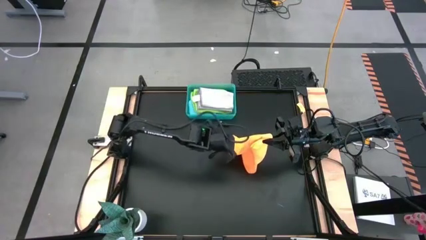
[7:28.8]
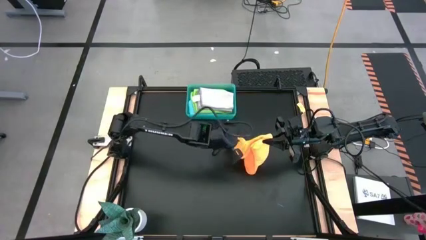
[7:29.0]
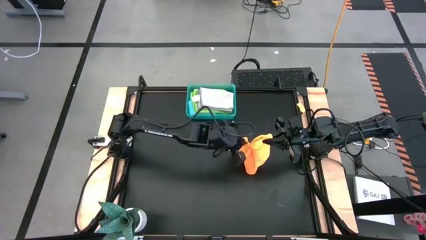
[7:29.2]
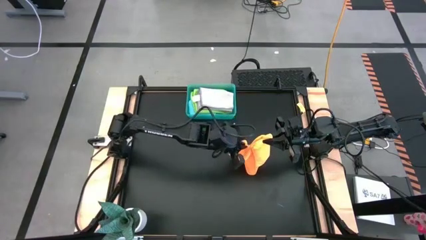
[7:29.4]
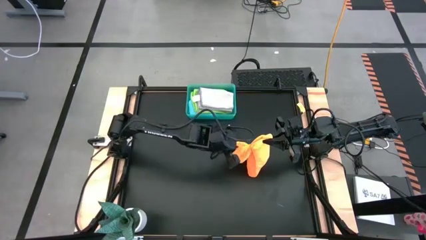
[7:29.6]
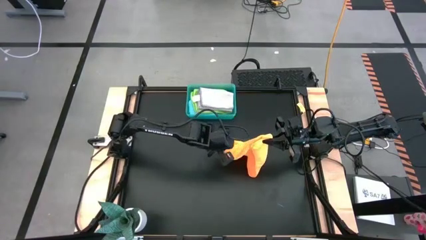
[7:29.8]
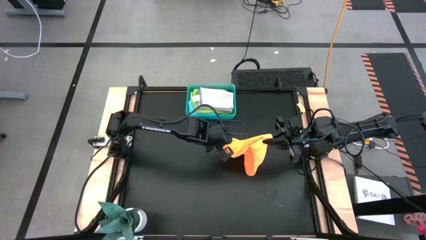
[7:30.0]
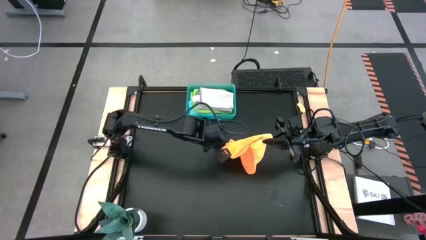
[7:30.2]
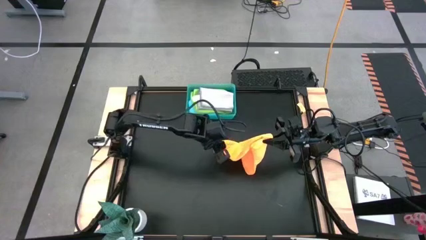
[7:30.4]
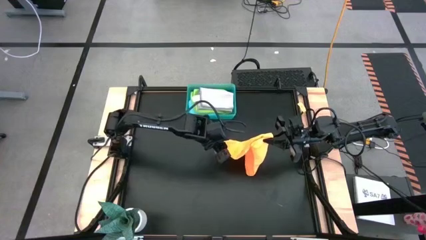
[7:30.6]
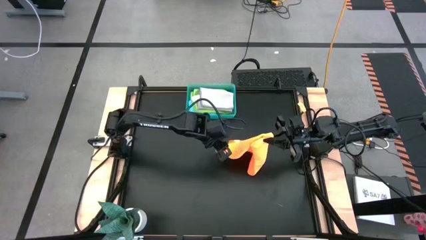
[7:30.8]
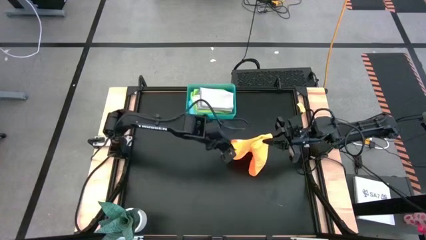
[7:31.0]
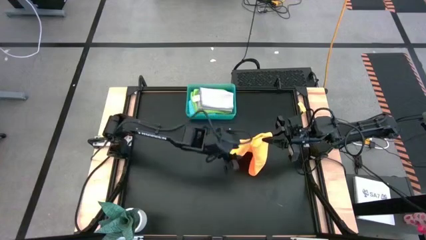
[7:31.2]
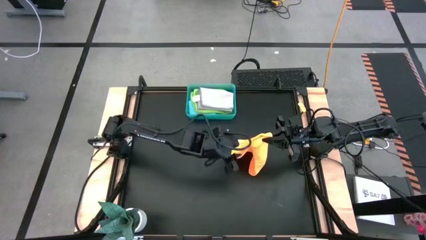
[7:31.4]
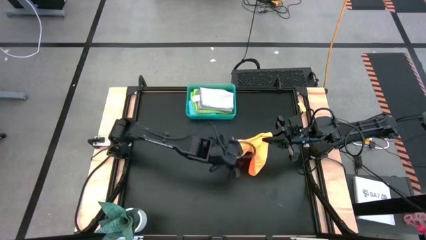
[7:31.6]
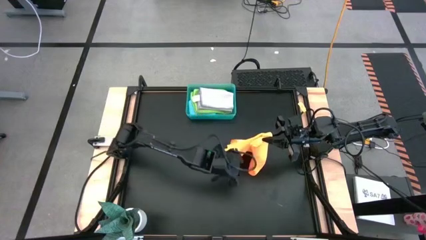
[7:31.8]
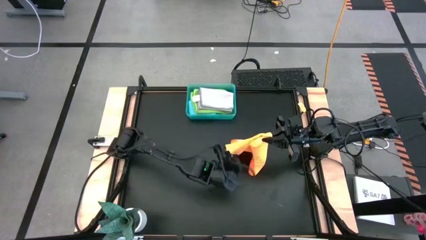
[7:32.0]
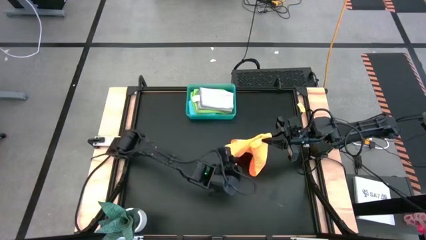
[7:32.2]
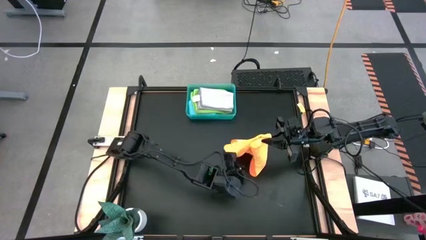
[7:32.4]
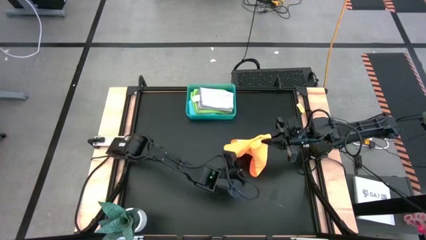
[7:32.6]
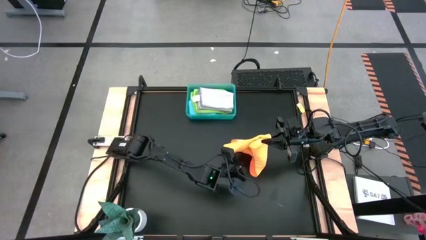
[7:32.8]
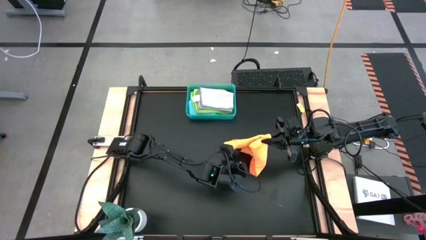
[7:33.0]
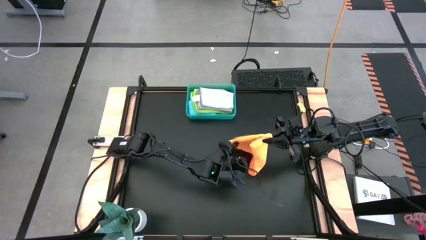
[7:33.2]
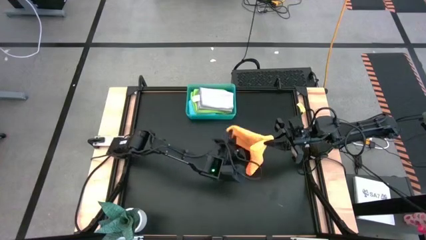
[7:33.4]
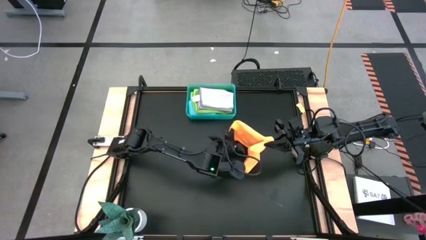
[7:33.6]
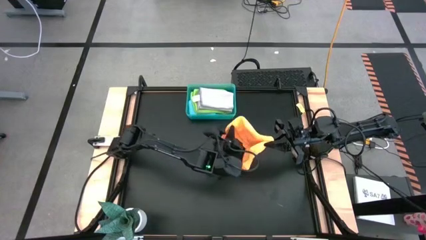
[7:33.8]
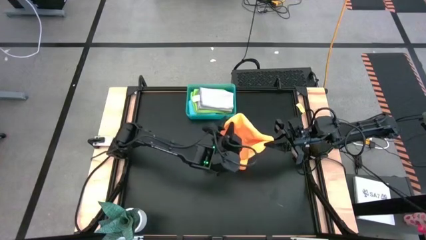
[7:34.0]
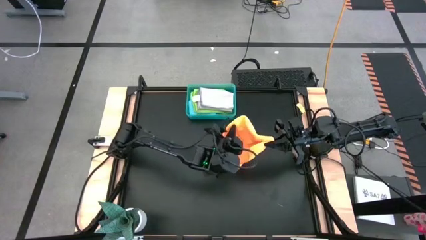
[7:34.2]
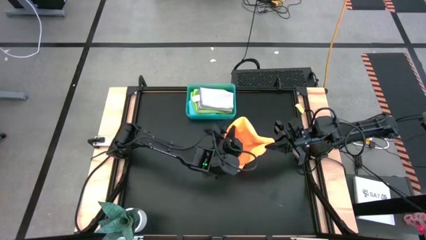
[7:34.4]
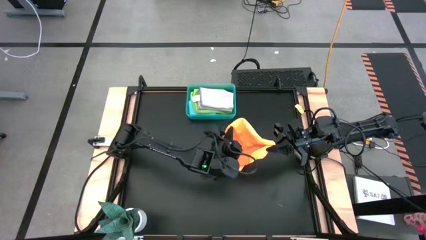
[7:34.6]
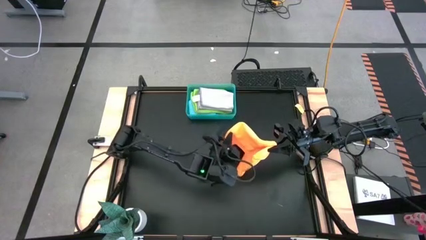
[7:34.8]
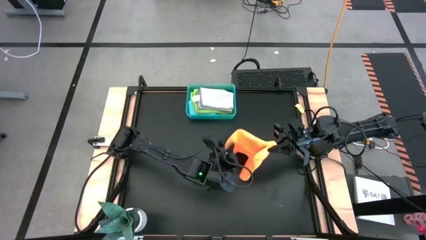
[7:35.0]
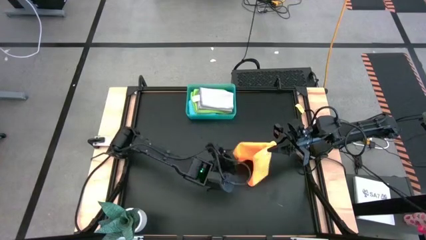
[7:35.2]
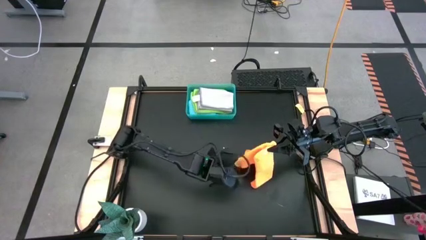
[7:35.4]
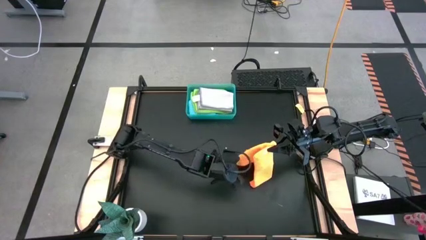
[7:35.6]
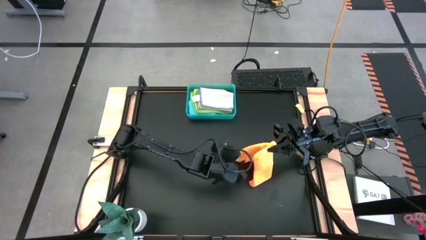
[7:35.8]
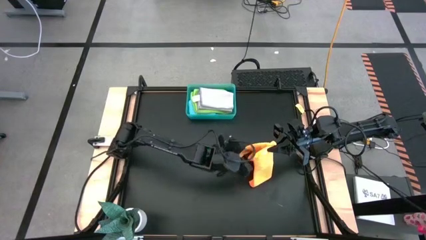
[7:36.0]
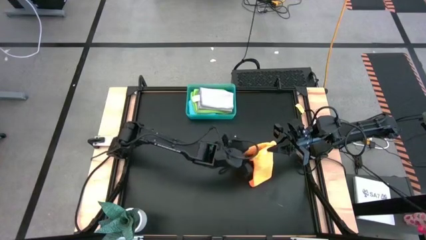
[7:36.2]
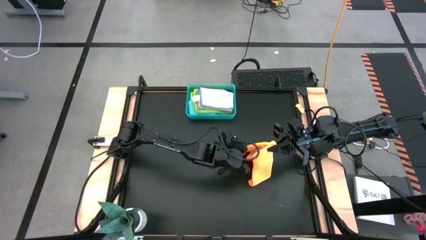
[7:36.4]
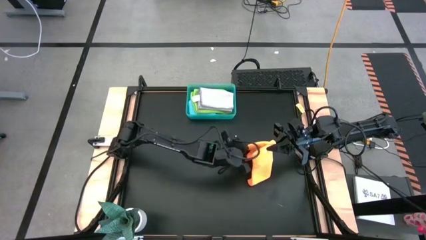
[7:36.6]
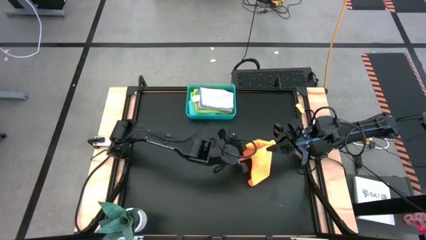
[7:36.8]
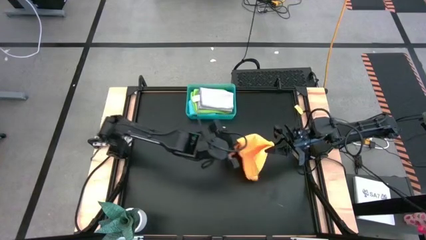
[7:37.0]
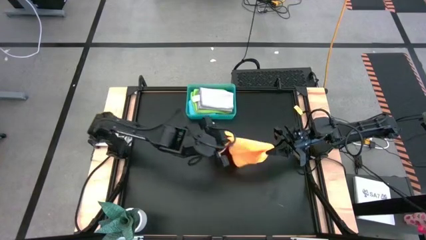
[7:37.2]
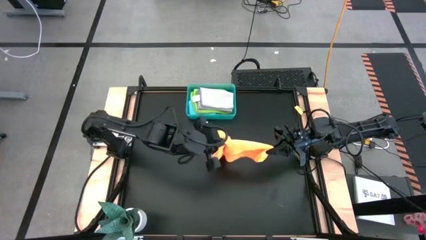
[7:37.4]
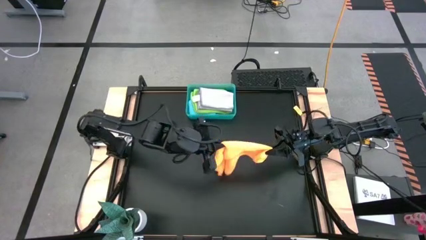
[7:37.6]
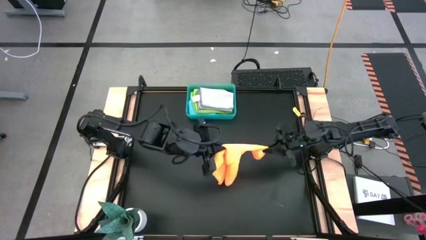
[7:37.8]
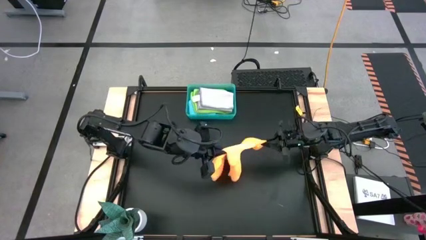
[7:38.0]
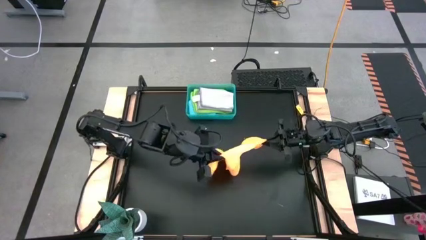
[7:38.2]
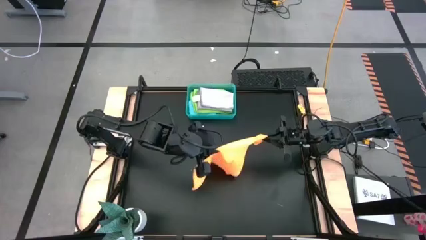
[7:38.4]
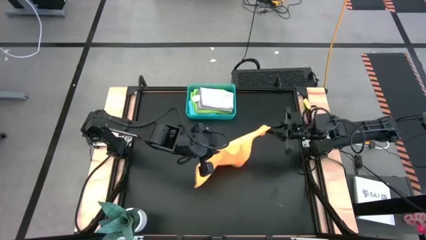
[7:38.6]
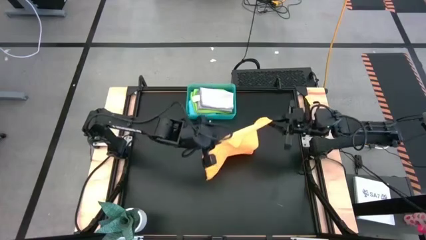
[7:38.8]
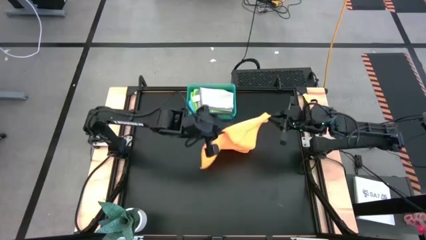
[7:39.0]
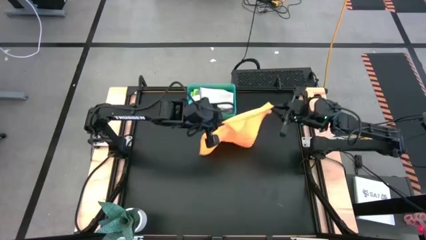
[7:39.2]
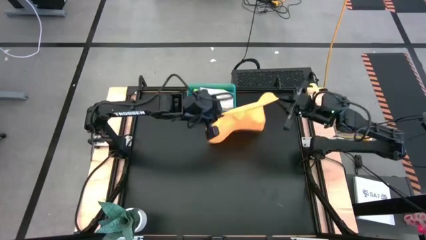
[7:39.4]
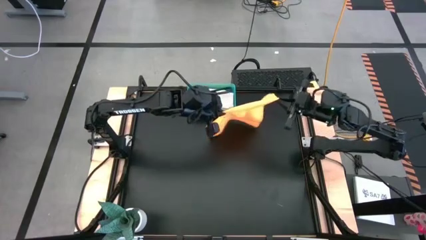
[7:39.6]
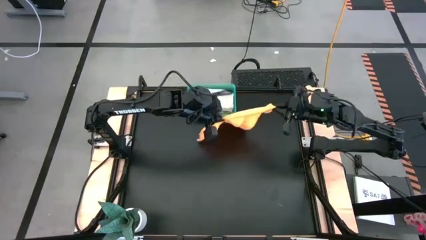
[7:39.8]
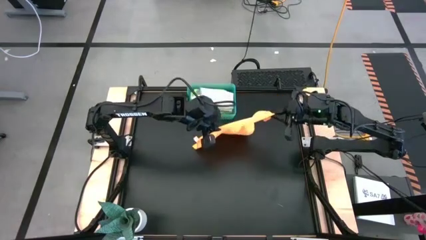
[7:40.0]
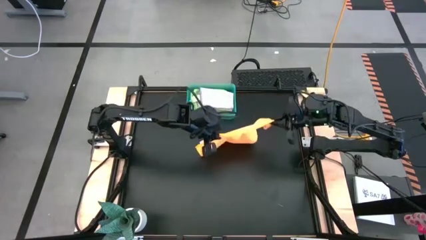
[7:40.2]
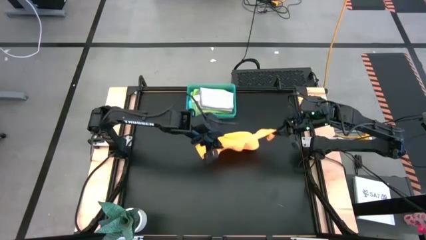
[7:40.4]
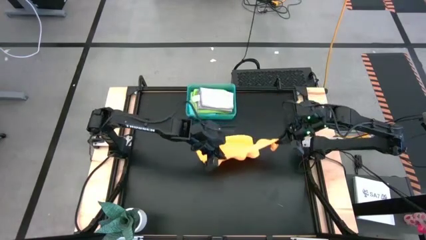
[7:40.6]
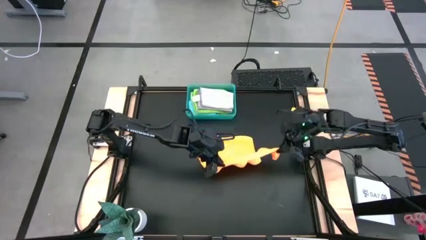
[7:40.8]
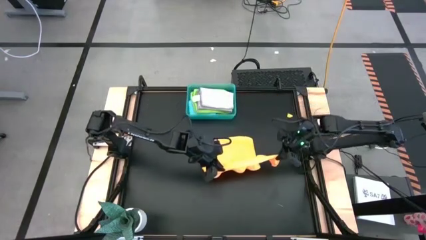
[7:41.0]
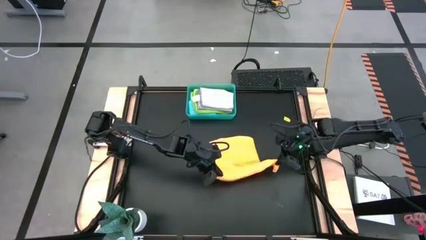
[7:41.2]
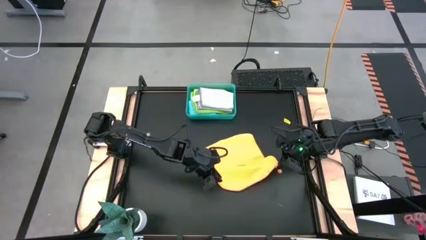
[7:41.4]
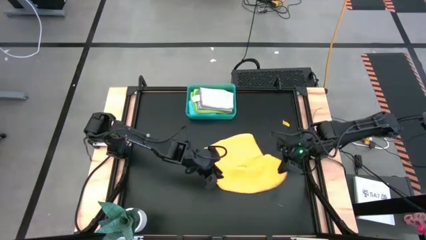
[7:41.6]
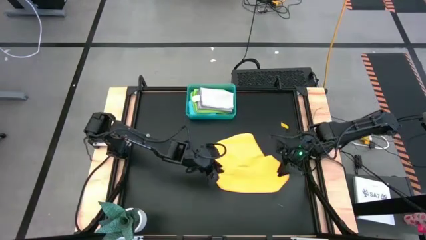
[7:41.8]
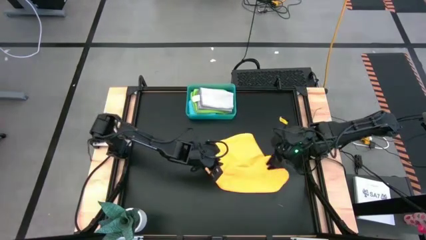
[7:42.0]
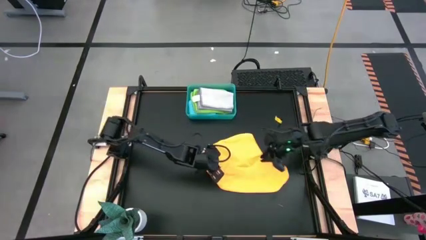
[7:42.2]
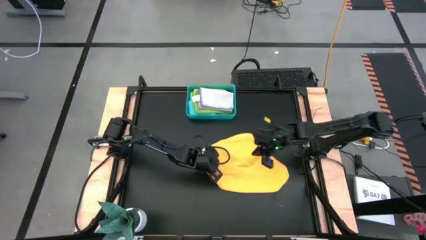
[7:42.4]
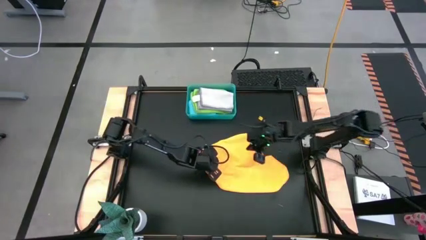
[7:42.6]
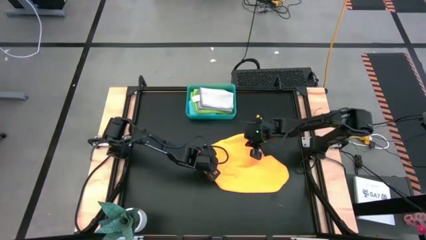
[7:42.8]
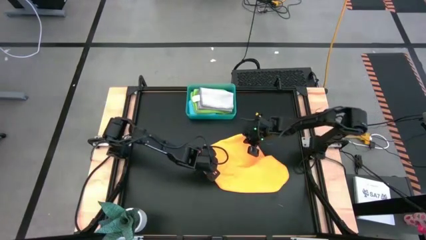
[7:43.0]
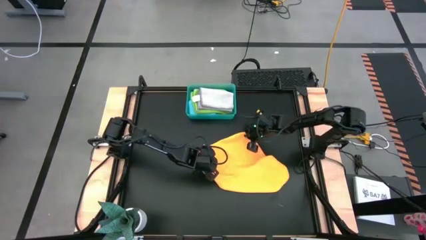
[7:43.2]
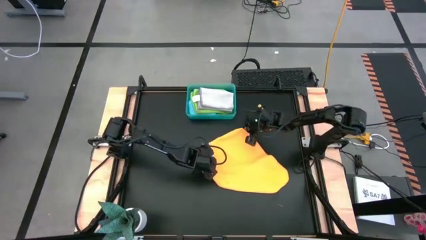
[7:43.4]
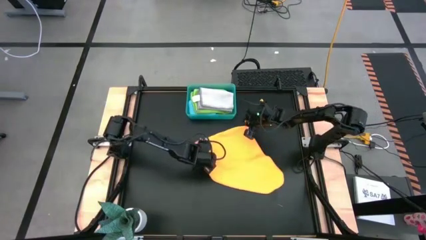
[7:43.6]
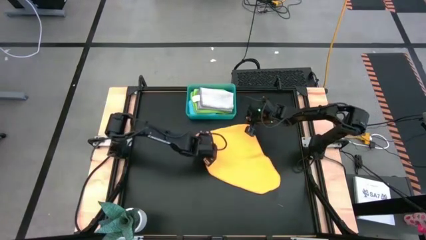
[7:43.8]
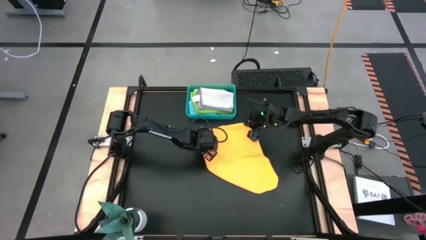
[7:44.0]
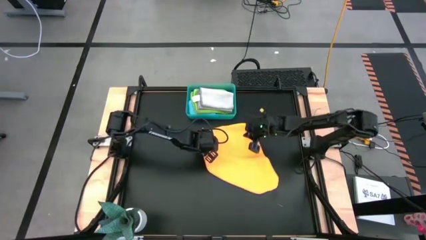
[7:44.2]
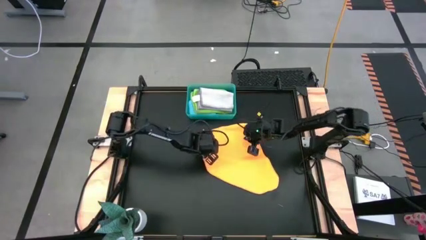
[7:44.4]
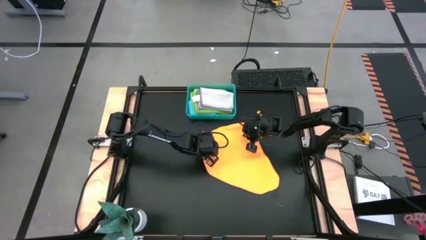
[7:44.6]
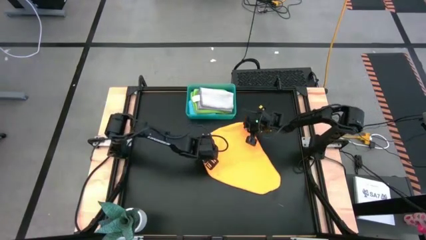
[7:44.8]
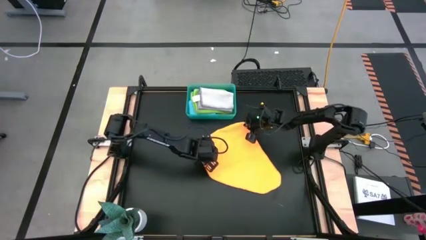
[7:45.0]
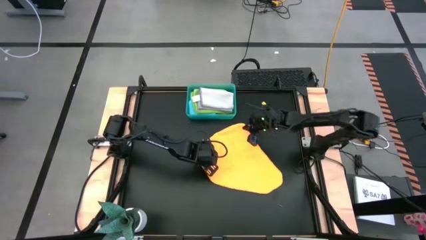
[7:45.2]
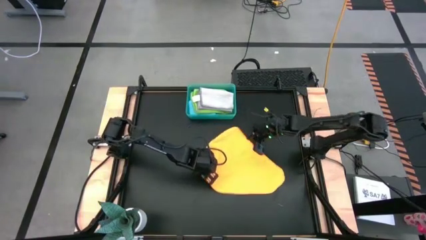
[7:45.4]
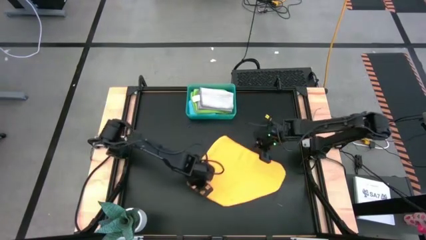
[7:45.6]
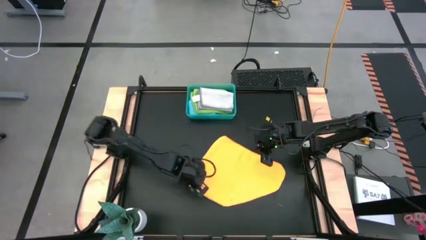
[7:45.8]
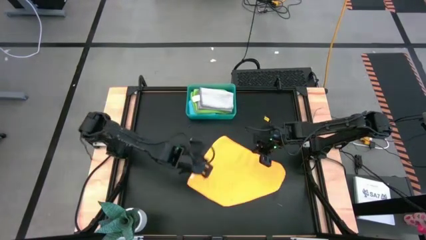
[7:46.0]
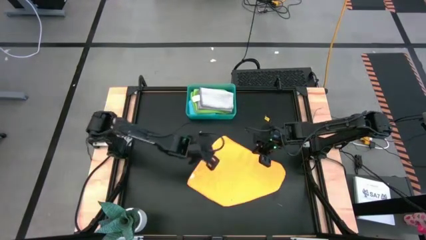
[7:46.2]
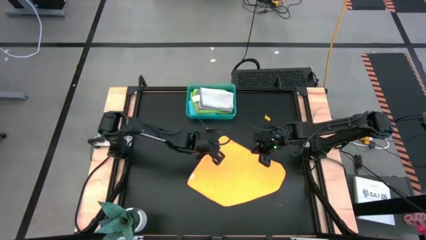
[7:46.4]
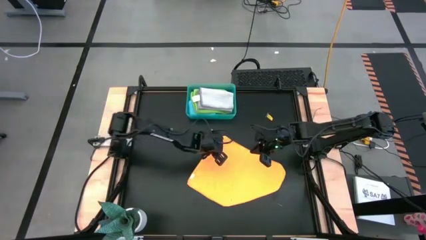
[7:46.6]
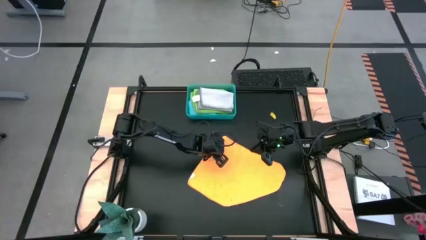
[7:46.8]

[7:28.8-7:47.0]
Task: Fold microfiber towels
Fold the orange microfiber towel
